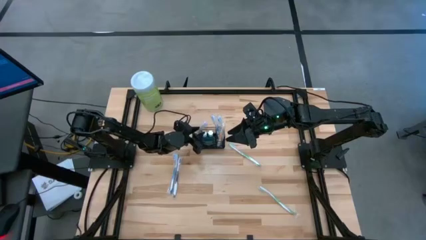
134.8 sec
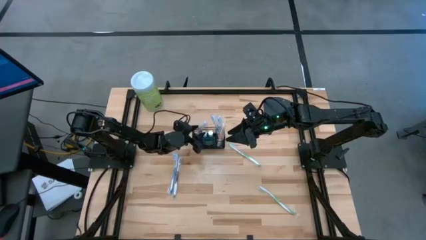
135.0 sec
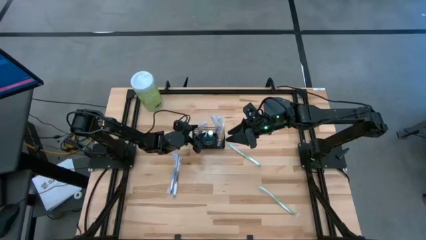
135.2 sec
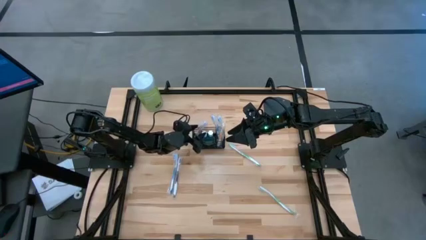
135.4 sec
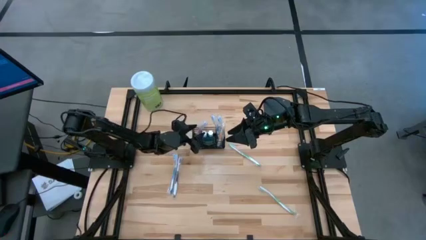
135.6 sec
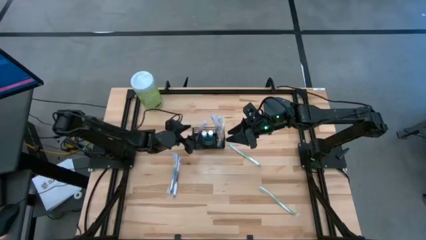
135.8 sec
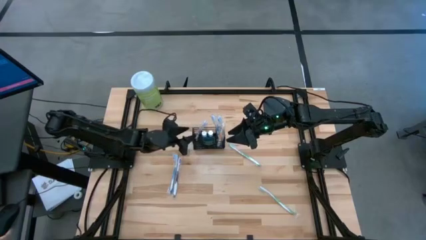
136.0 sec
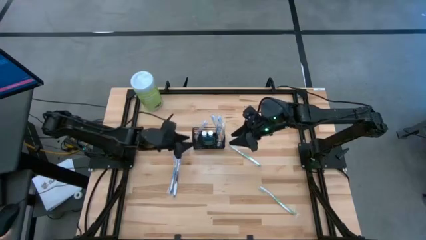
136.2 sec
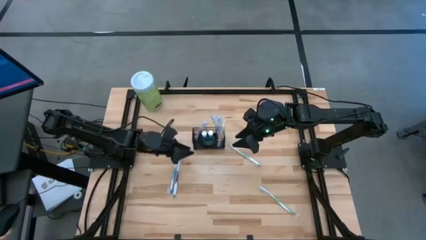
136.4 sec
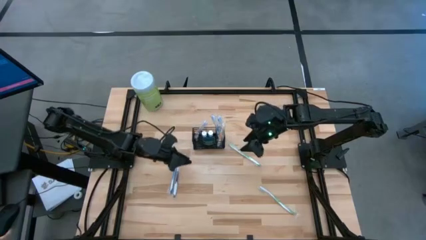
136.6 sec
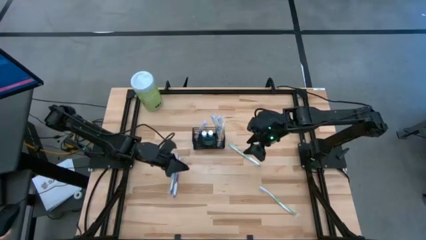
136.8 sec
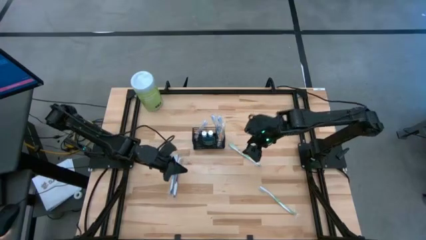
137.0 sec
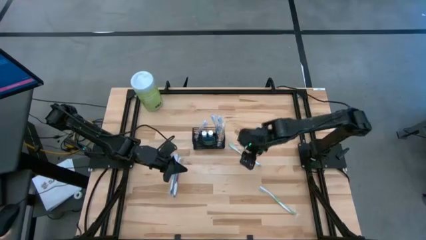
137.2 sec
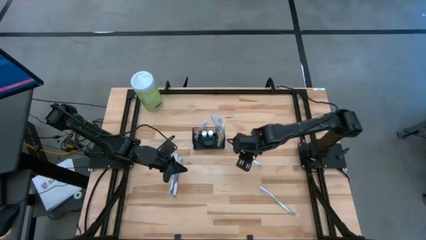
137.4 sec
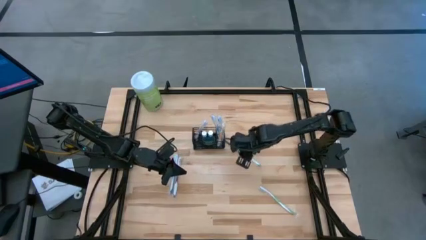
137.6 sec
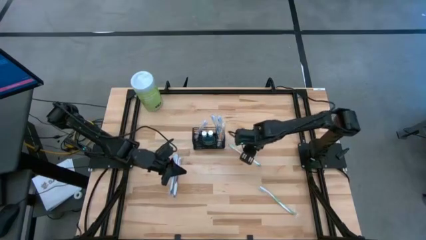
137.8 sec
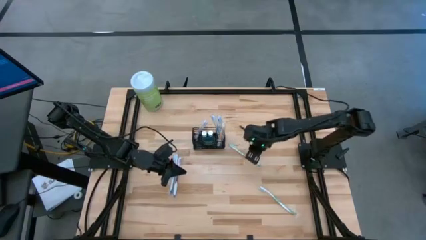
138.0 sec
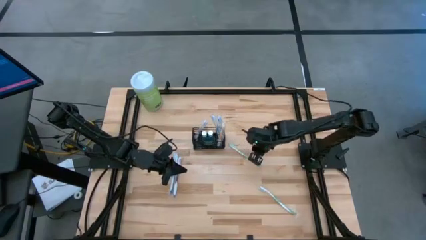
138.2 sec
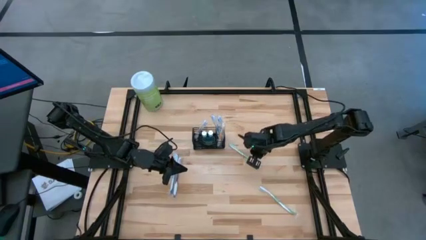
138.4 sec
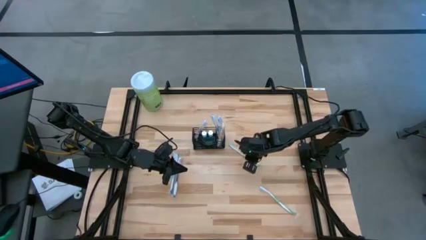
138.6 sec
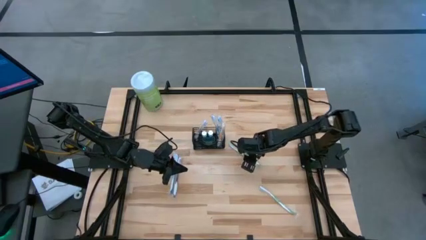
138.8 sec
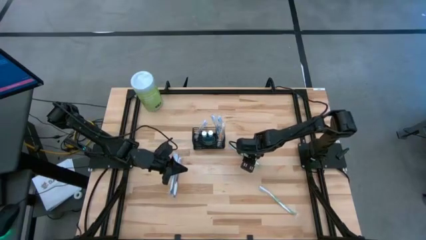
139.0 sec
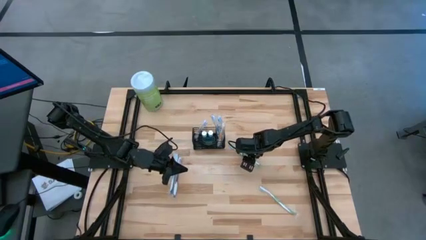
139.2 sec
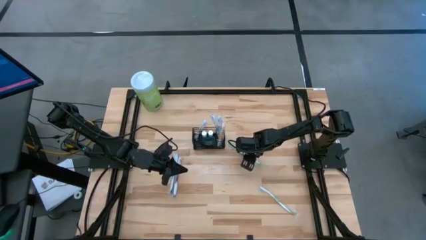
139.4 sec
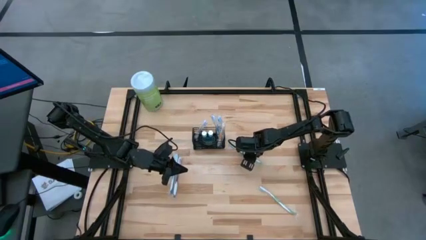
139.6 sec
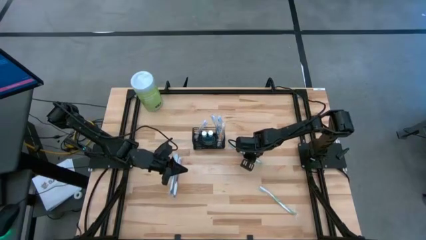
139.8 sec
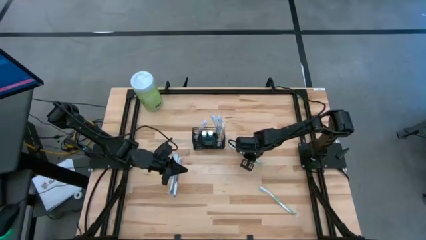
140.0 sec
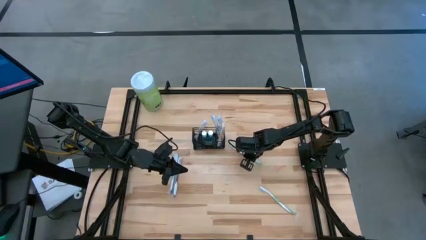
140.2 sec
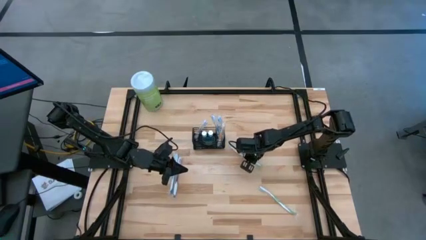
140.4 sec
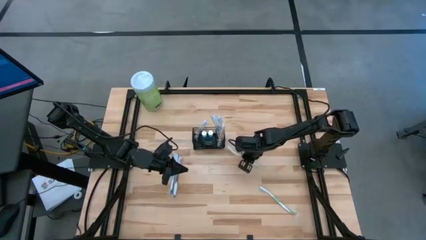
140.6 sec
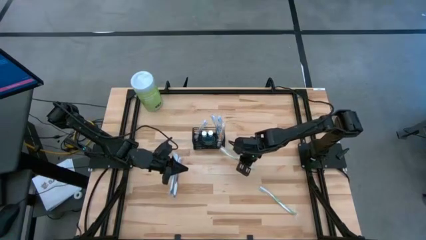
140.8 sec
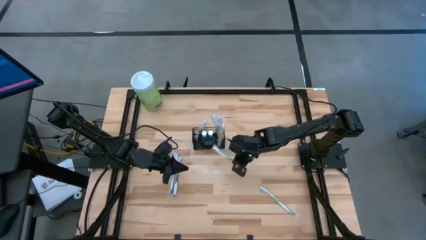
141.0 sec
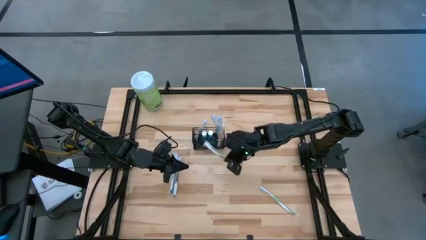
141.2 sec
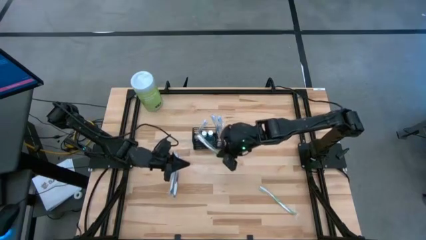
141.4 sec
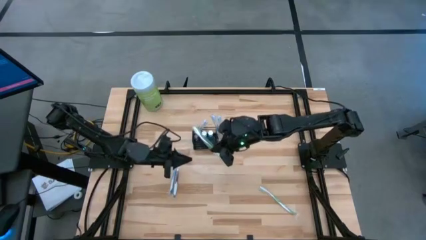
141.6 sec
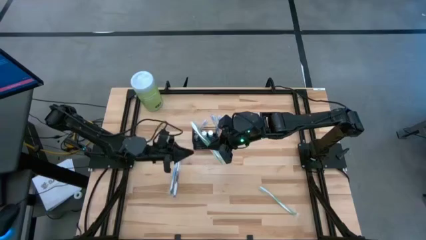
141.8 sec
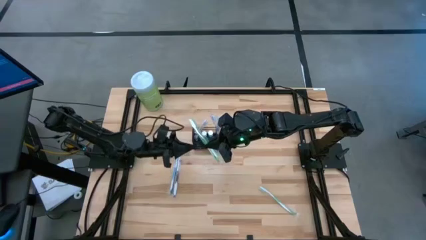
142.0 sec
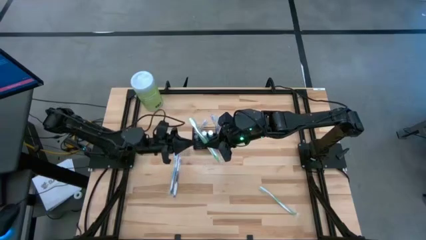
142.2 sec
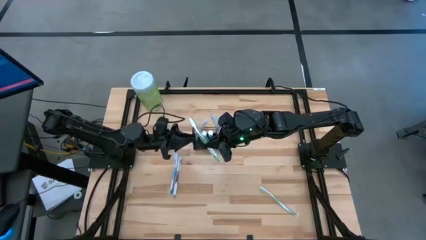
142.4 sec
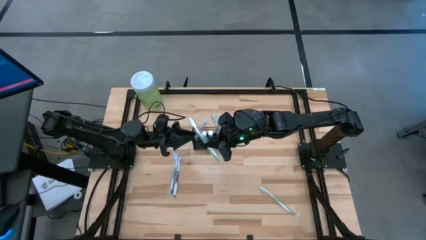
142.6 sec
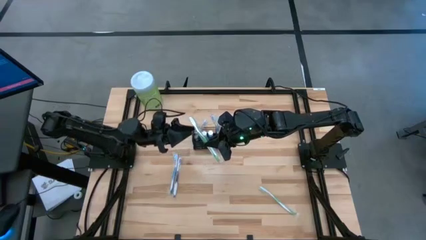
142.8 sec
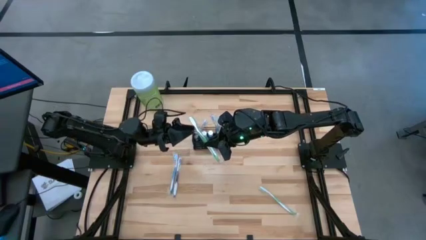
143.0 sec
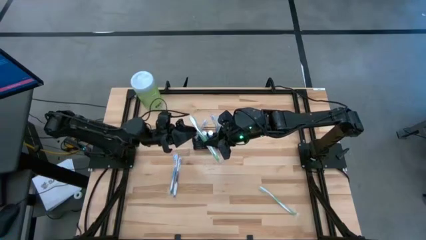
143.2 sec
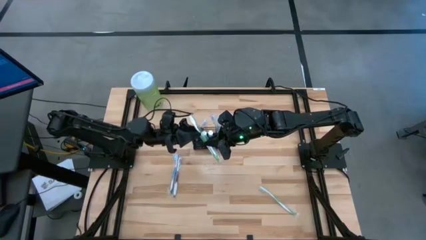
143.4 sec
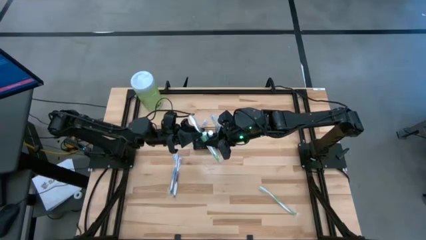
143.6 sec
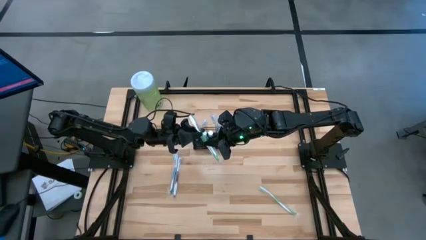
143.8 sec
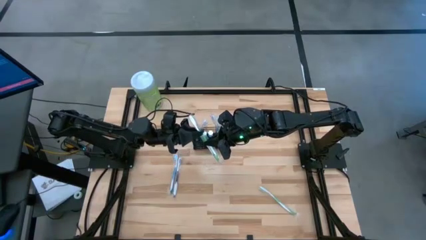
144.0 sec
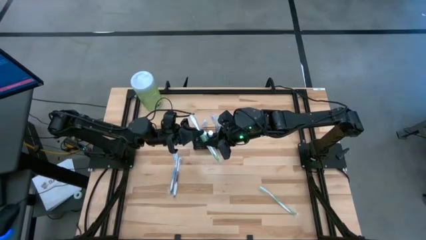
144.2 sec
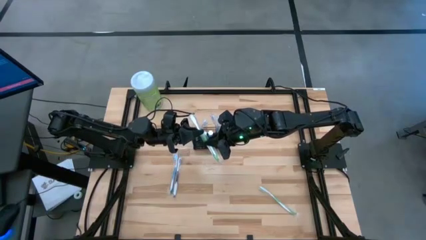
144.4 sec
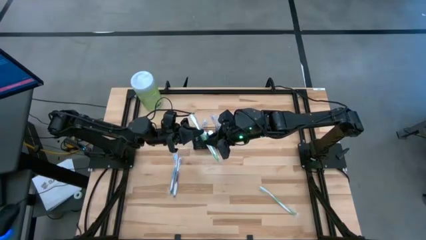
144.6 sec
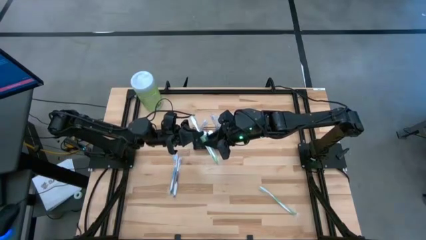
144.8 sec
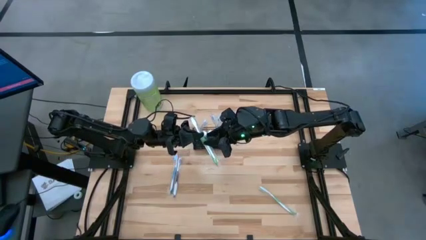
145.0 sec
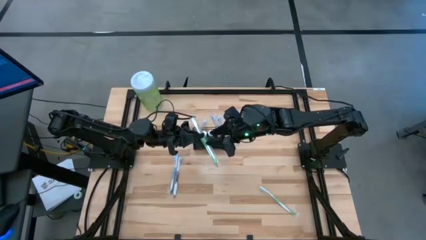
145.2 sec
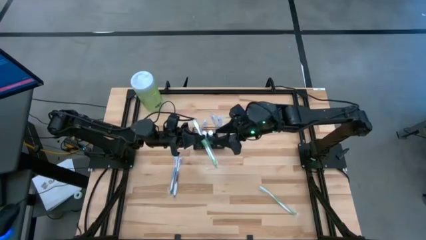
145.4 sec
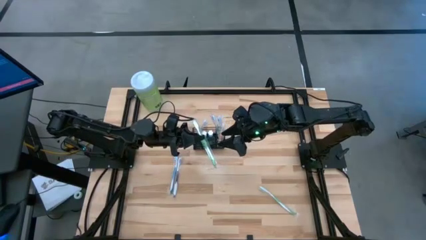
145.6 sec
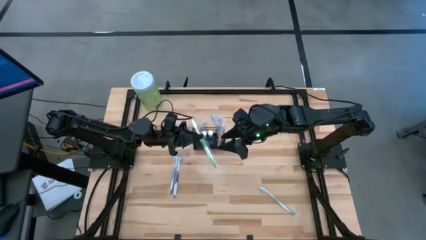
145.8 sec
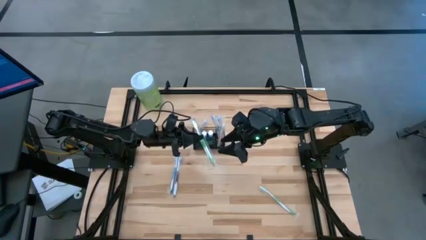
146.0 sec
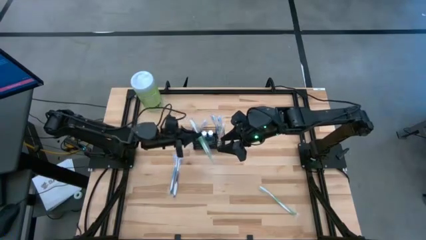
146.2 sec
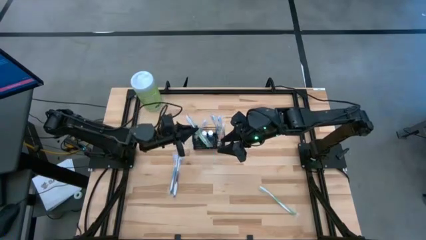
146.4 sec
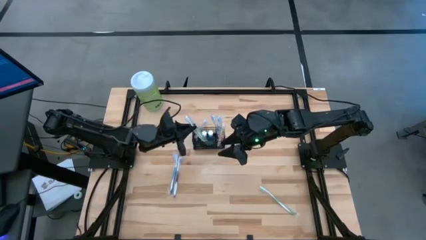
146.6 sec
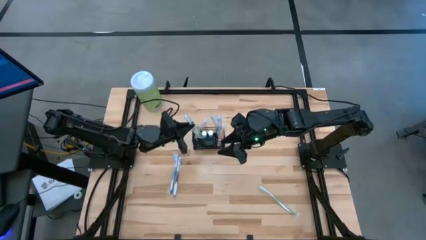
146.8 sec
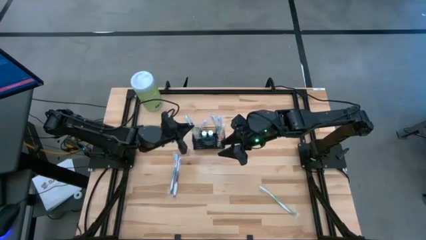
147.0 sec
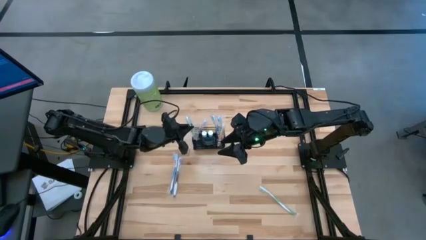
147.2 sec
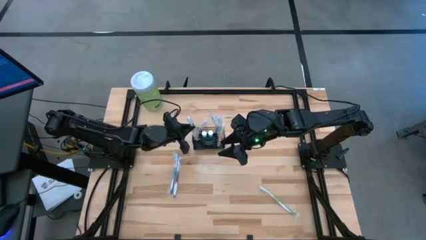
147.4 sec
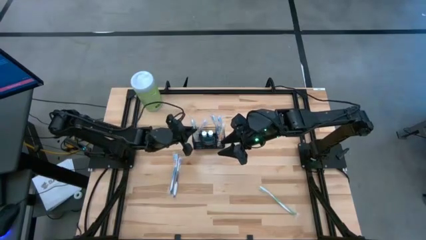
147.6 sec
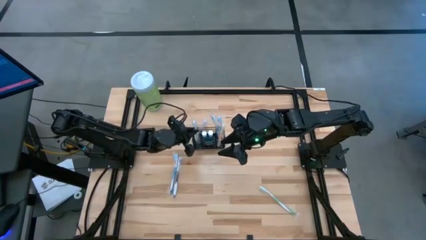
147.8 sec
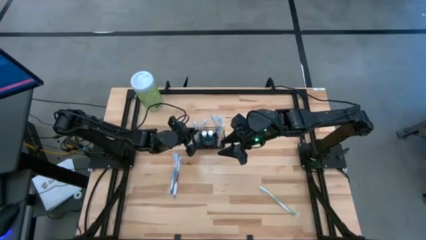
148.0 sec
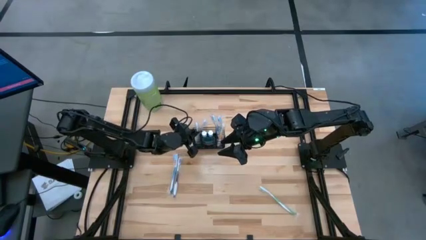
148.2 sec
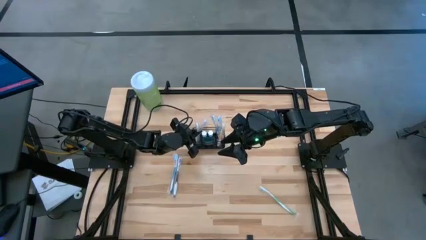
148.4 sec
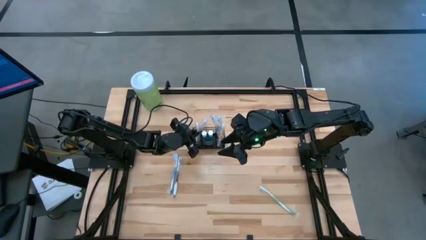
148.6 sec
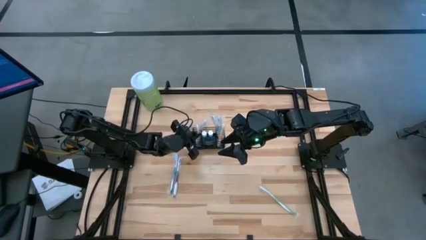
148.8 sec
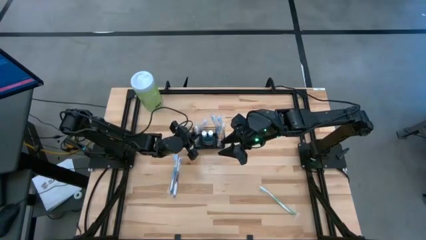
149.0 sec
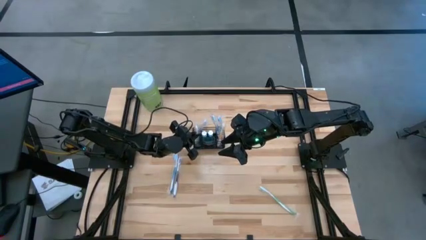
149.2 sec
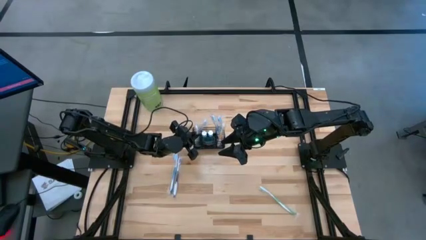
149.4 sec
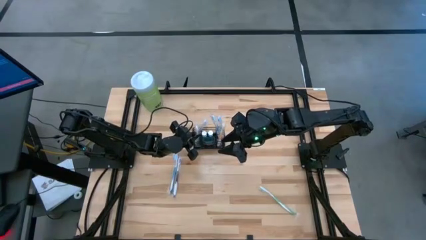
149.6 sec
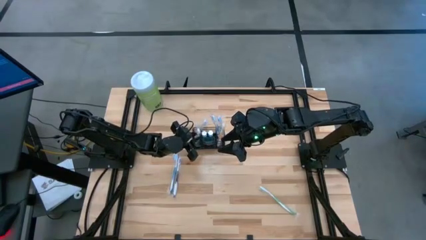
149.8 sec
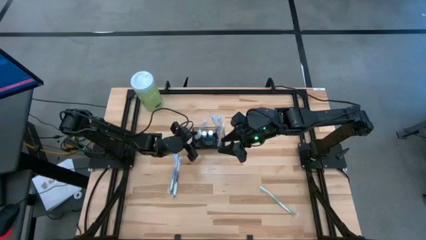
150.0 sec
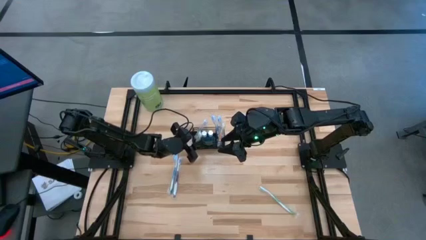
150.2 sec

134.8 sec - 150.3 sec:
Task: Pick & Place toothbrushing station
Put the top green toothbrush into the black mesh organizer
